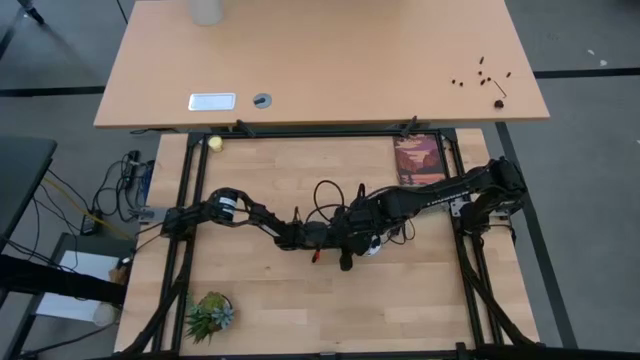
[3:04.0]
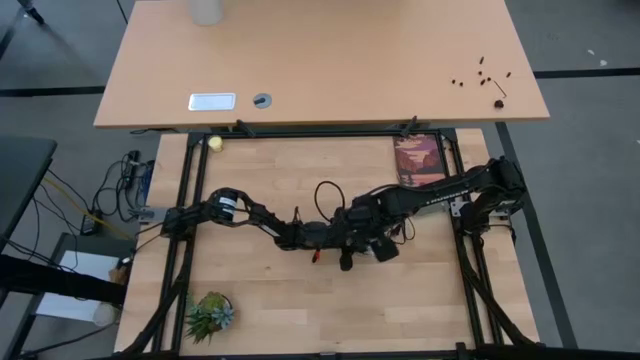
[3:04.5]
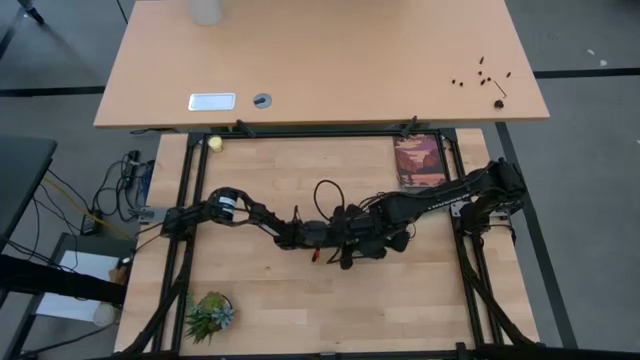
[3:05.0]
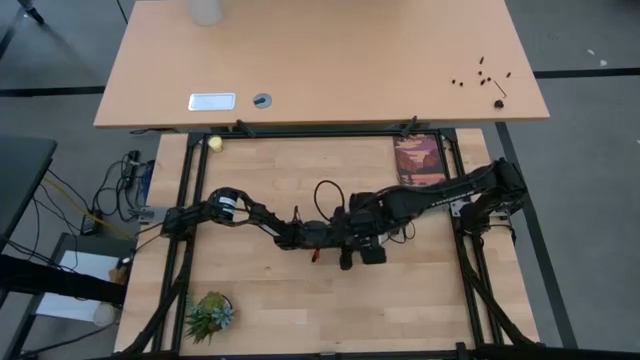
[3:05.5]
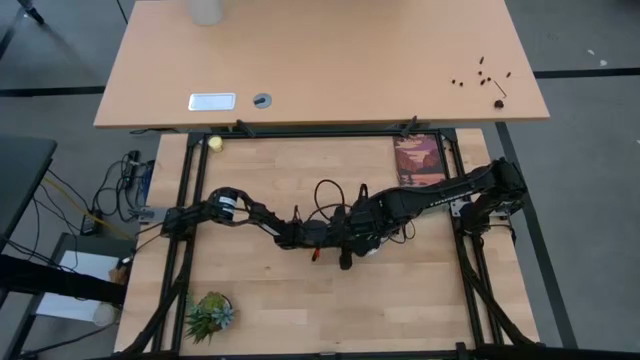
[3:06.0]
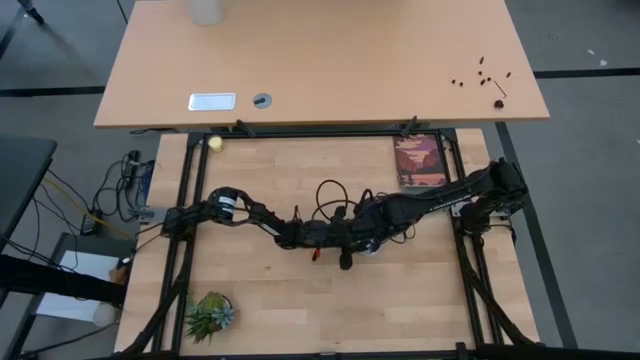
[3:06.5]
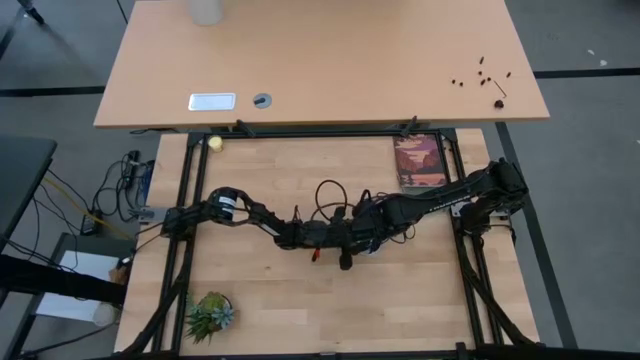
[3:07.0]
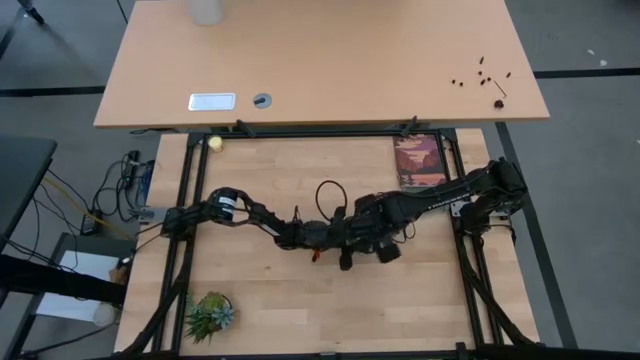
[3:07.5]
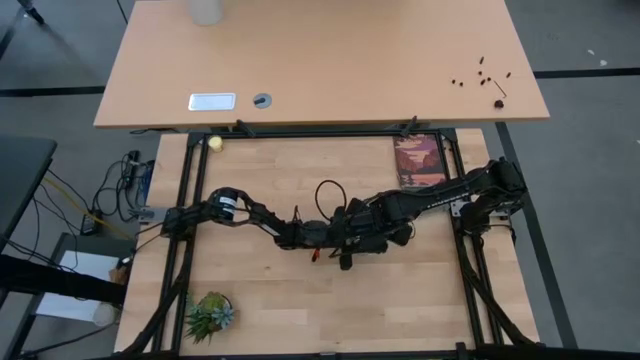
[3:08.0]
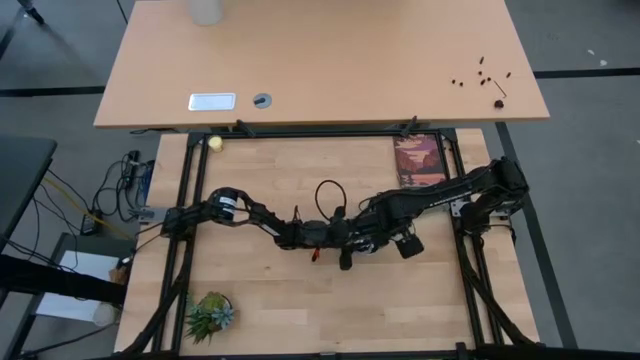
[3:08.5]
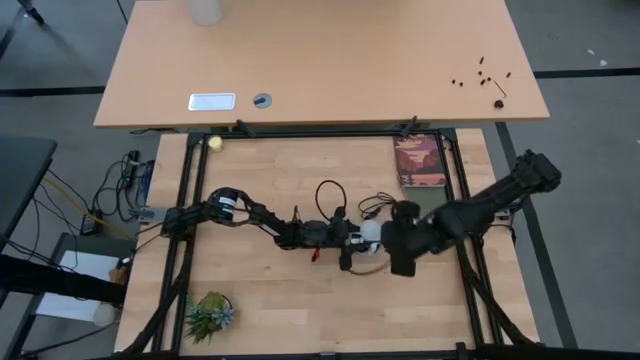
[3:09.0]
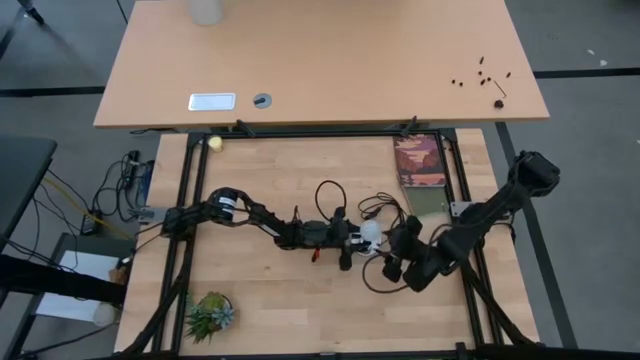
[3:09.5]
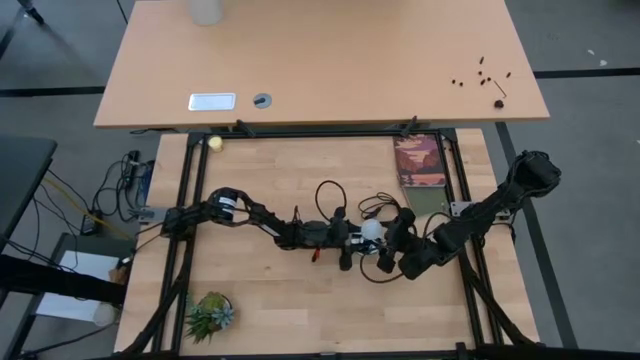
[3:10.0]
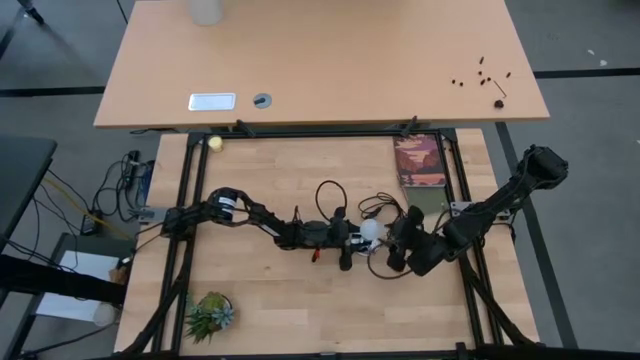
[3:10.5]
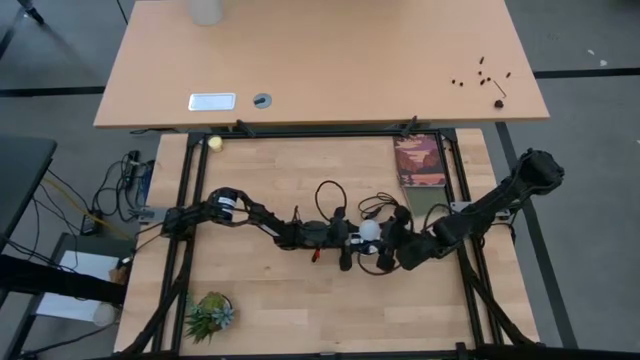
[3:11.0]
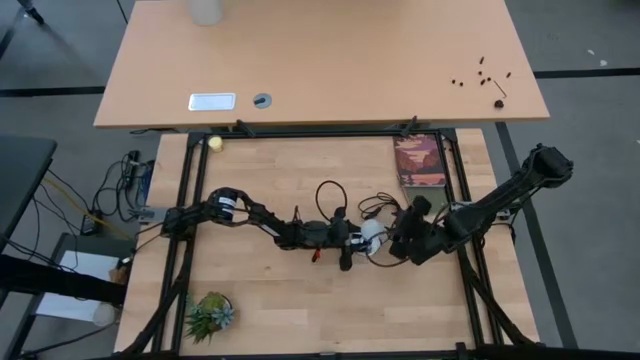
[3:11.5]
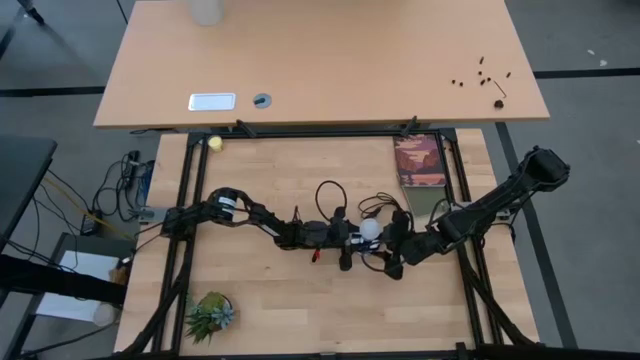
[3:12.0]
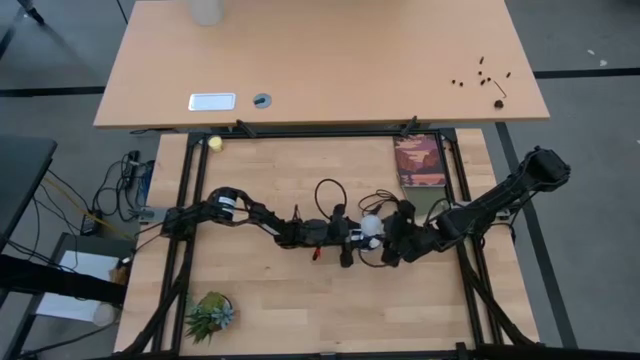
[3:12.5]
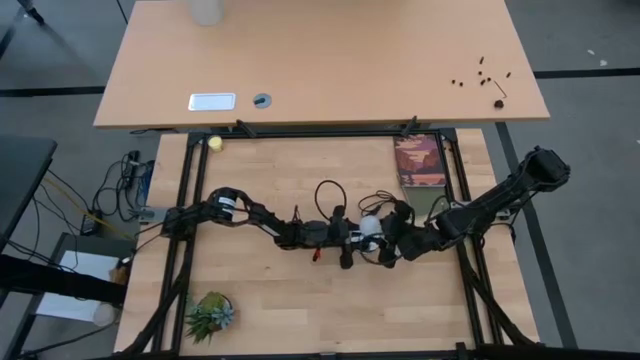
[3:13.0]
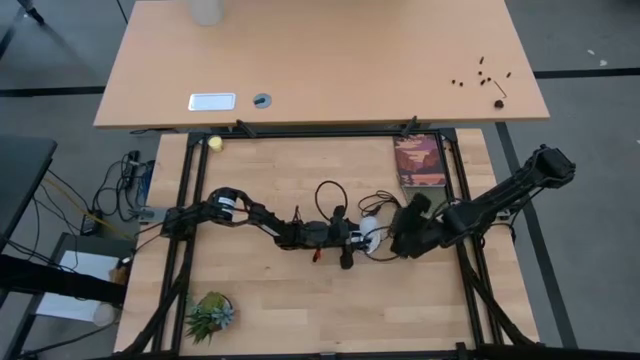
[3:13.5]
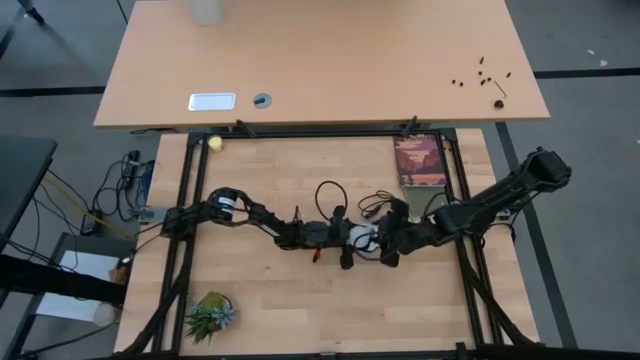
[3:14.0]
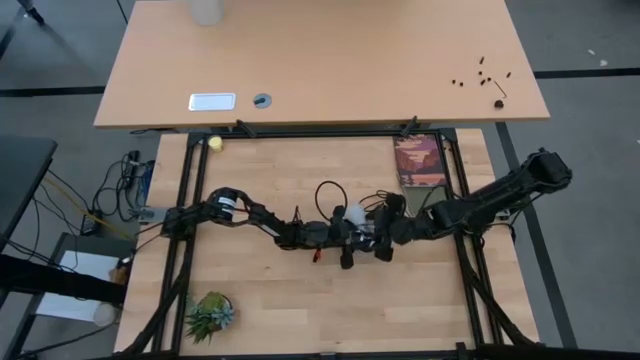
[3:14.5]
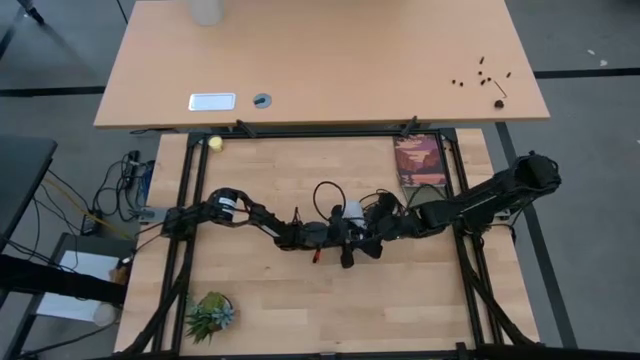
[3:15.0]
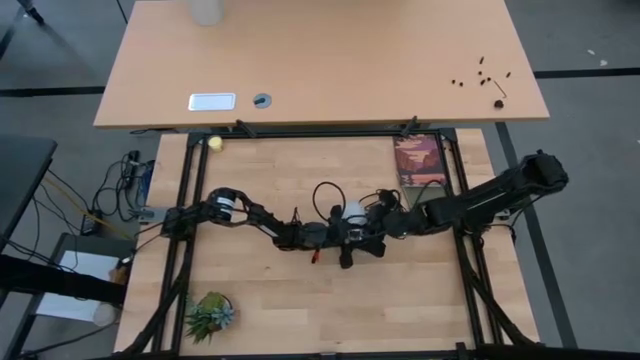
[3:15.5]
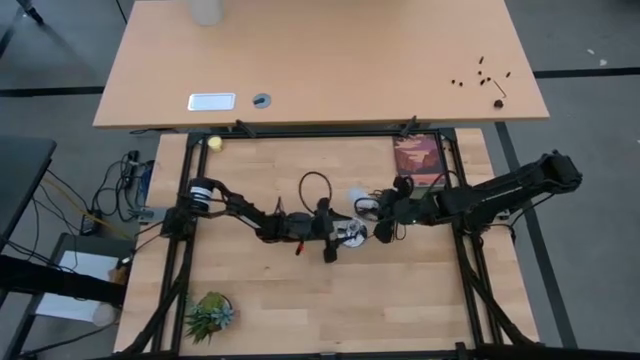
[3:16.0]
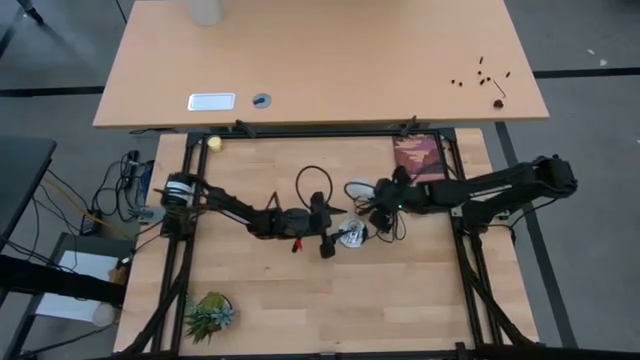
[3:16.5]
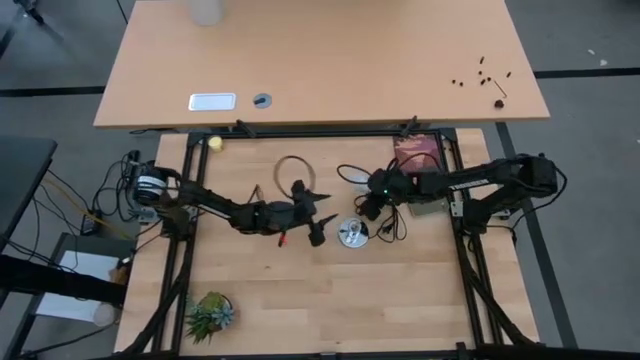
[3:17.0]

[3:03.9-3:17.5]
Task: Screw lightbulb
Remove the lightbulb from the silver lamp

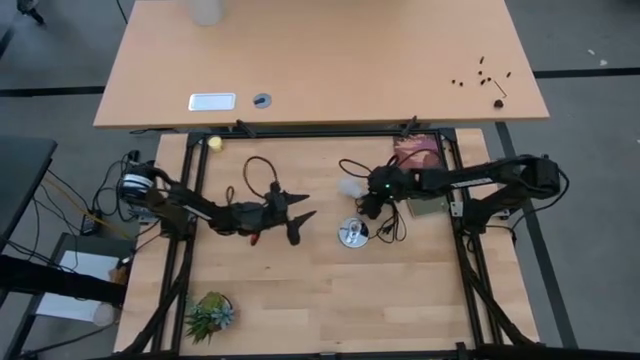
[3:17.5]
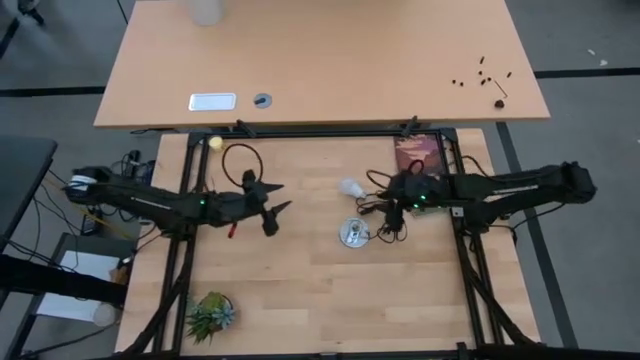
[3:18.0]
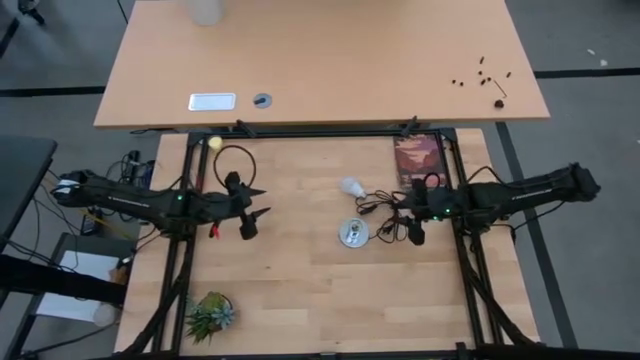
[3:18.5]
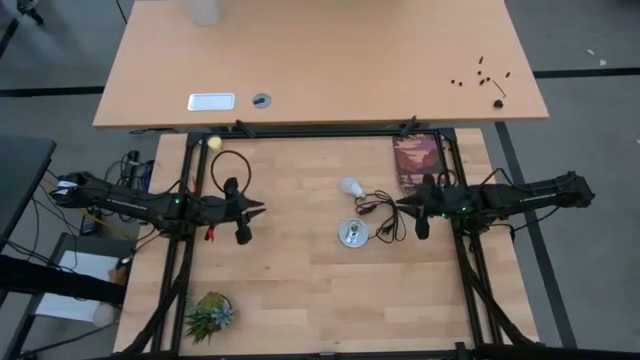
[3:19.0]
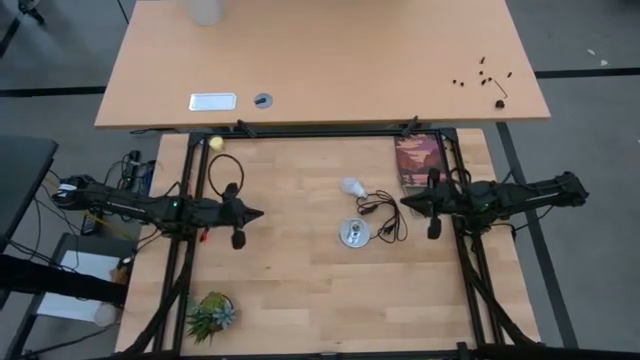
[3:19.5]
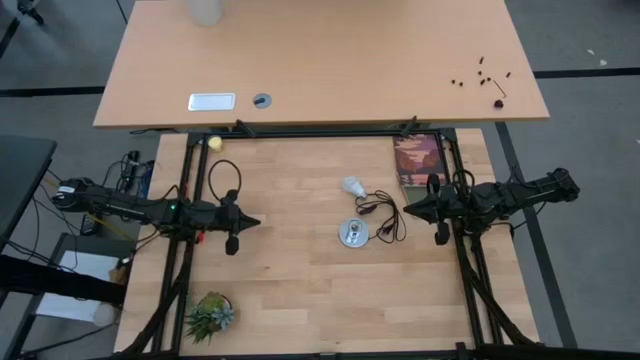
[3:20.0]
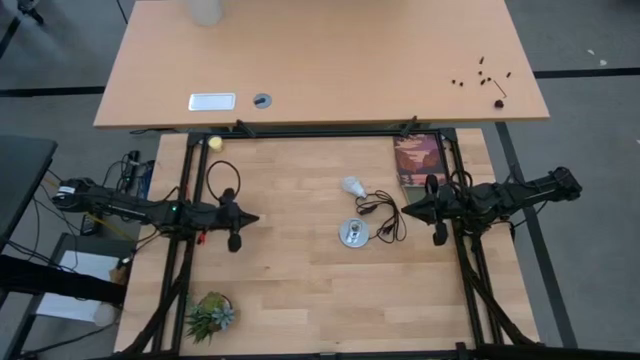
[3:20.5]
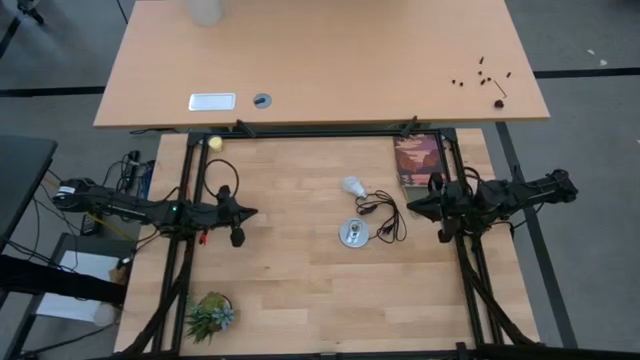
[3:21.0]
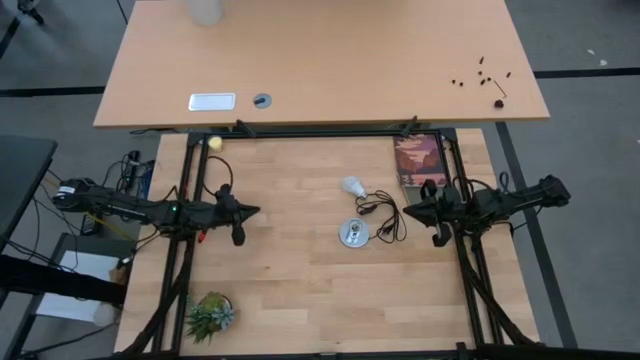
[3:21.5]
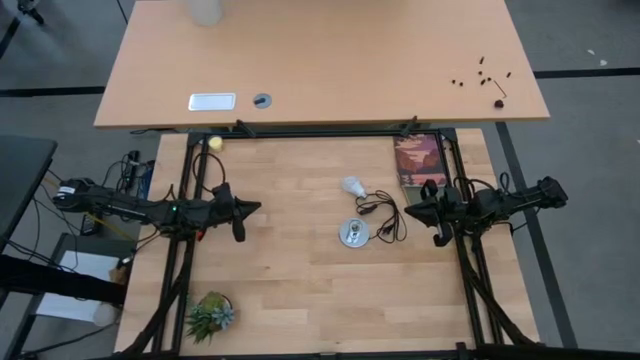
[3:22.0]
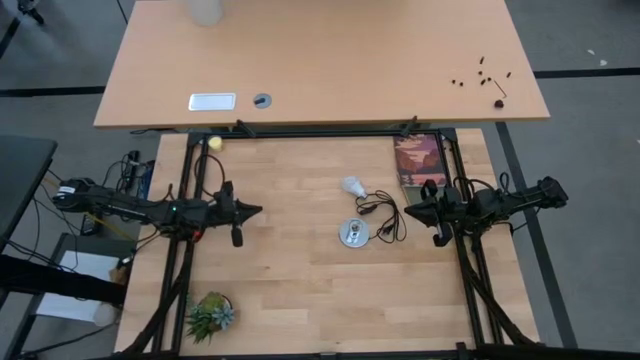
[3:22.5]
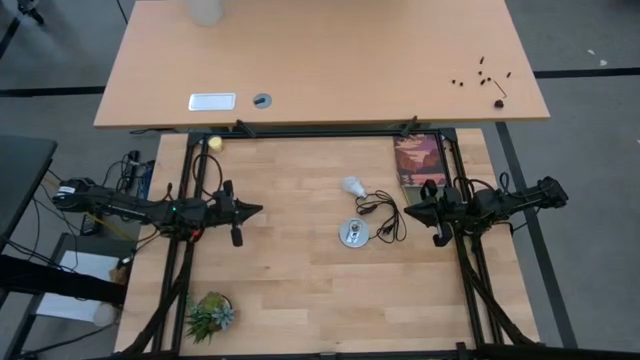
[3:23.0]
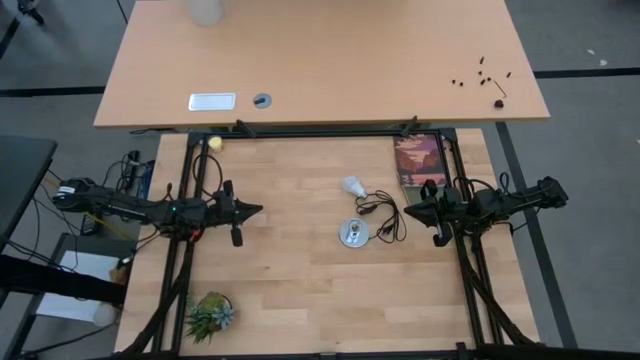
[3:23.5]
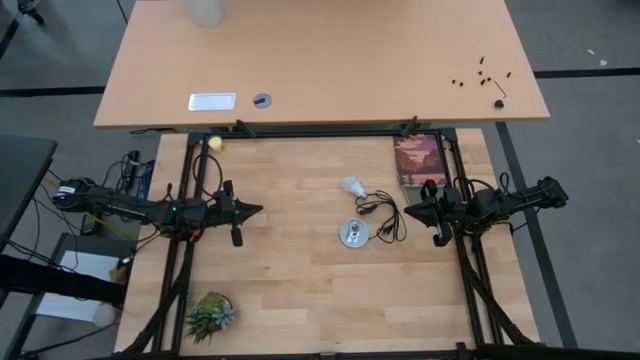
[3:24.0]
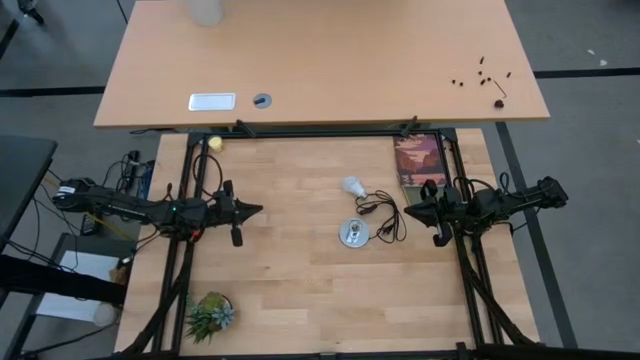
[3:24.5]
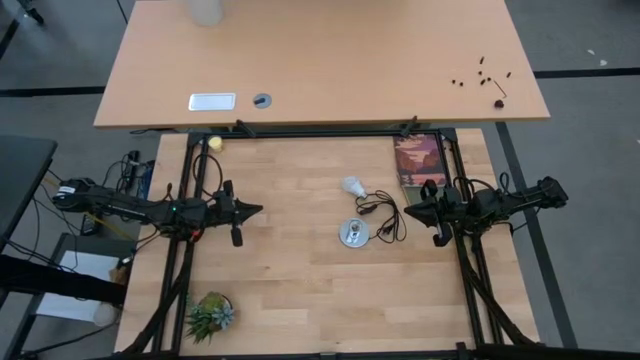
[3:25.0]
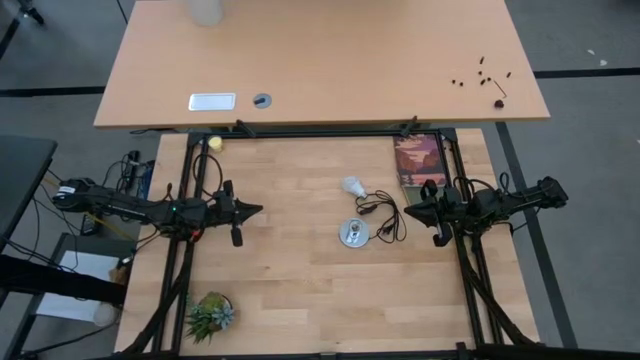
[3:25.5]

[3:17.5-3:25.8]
Return to Home Position
